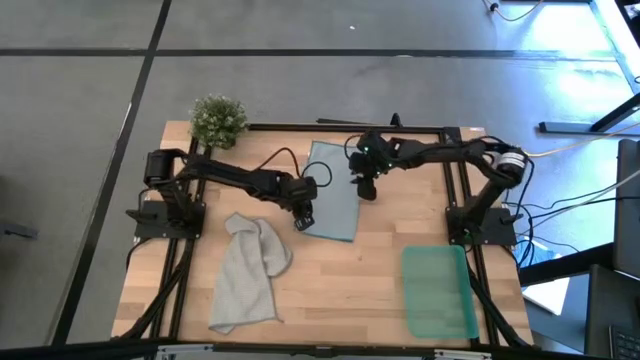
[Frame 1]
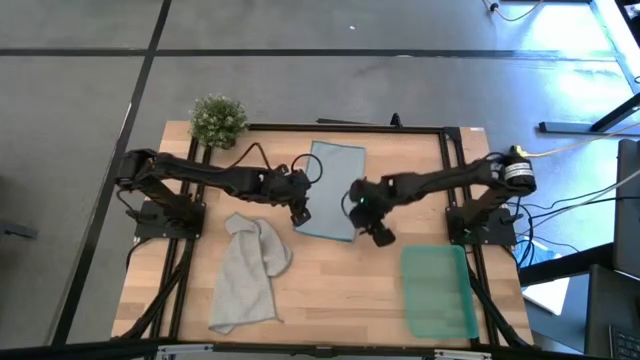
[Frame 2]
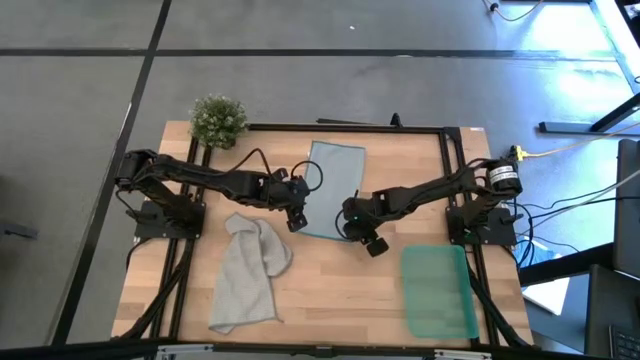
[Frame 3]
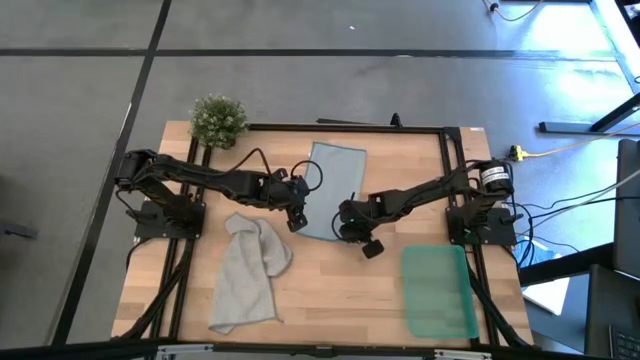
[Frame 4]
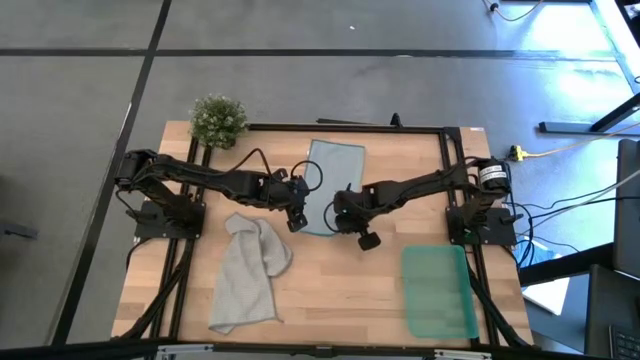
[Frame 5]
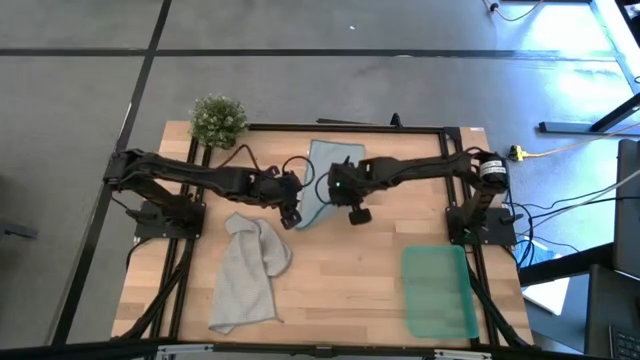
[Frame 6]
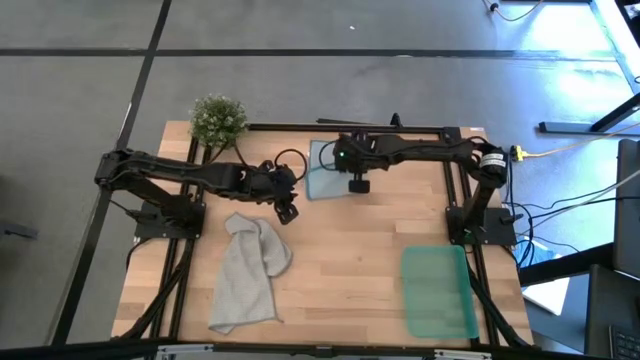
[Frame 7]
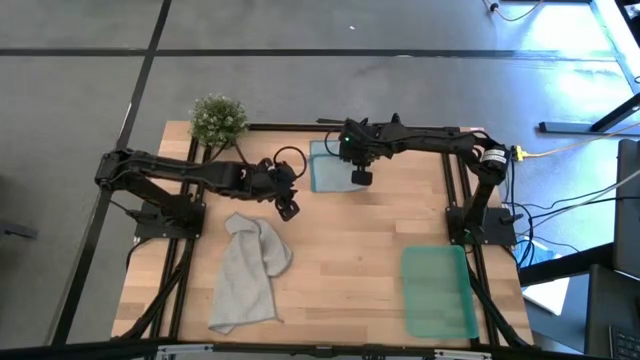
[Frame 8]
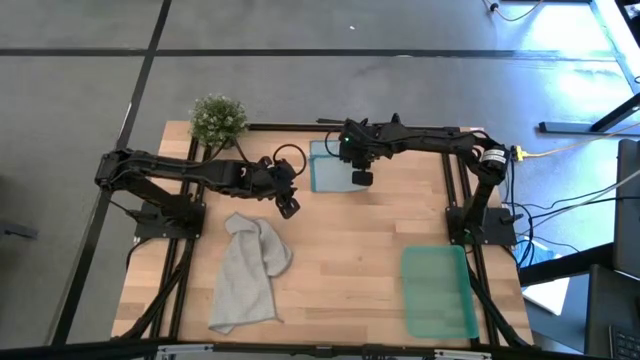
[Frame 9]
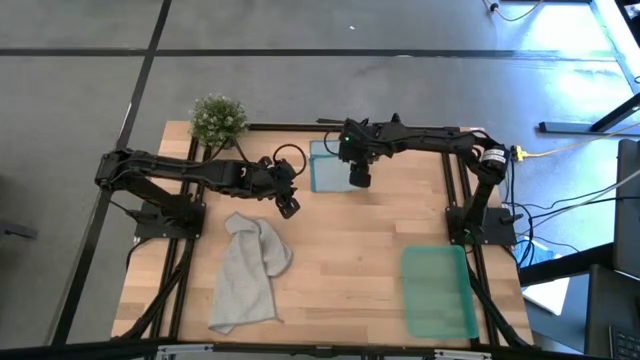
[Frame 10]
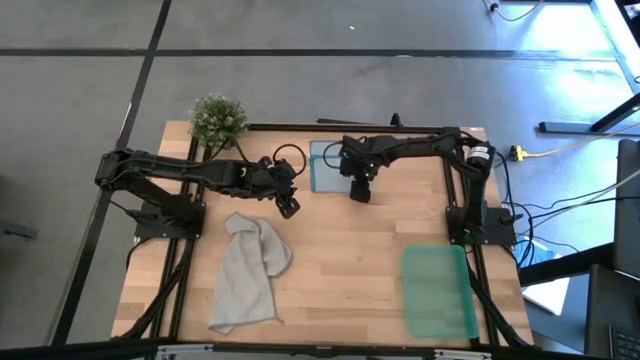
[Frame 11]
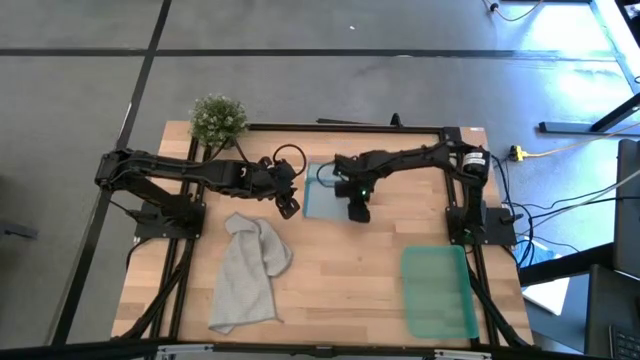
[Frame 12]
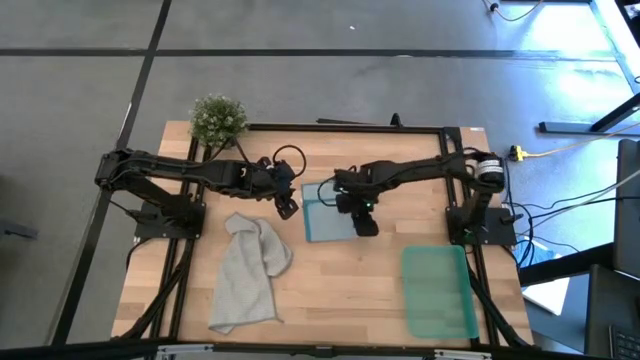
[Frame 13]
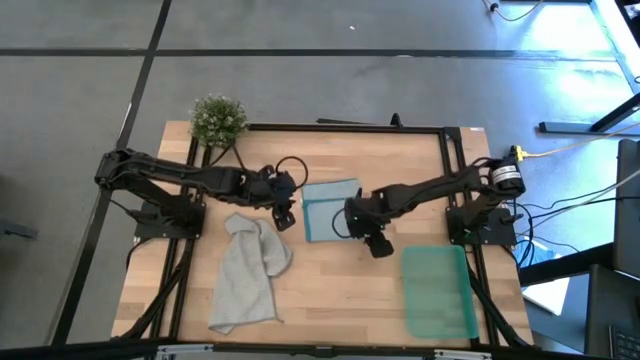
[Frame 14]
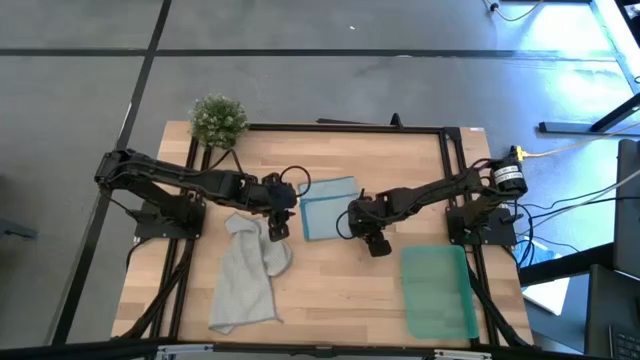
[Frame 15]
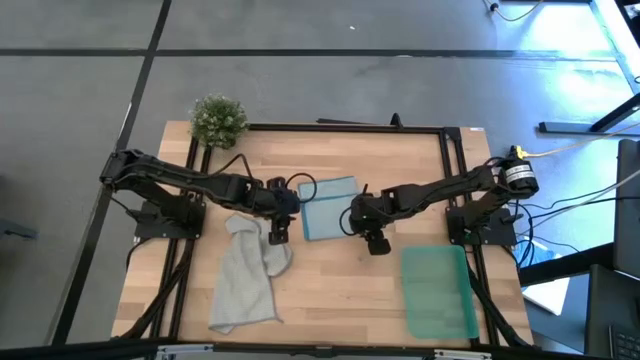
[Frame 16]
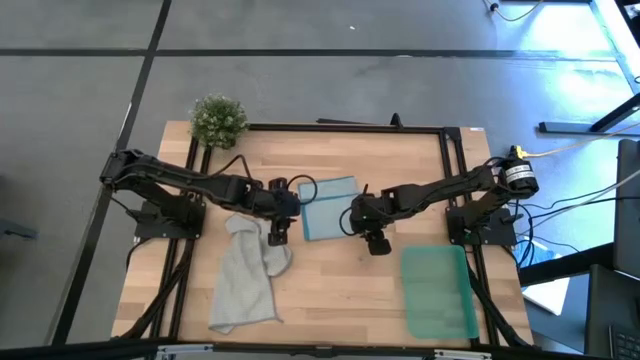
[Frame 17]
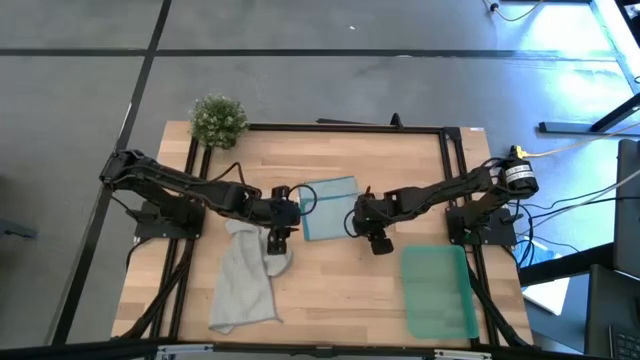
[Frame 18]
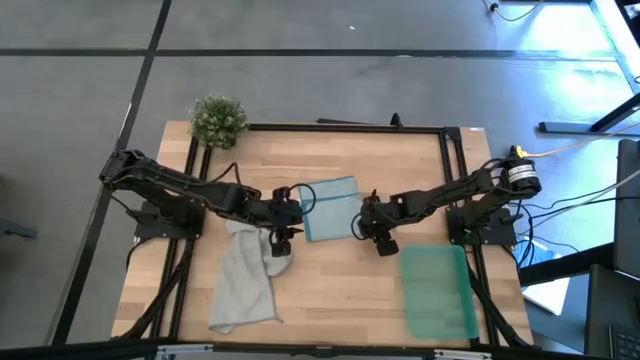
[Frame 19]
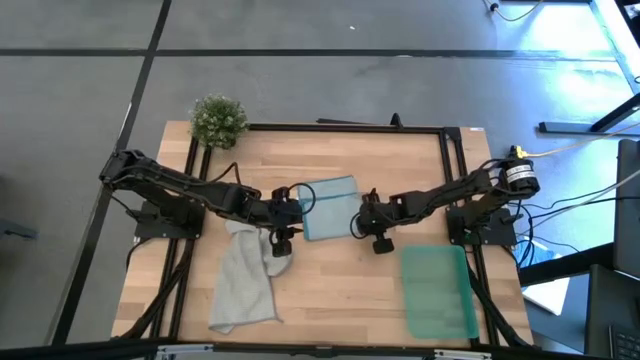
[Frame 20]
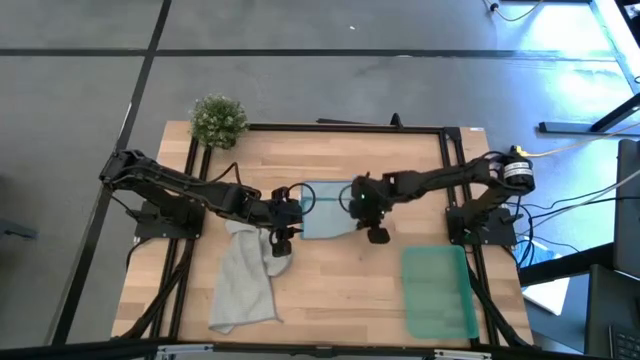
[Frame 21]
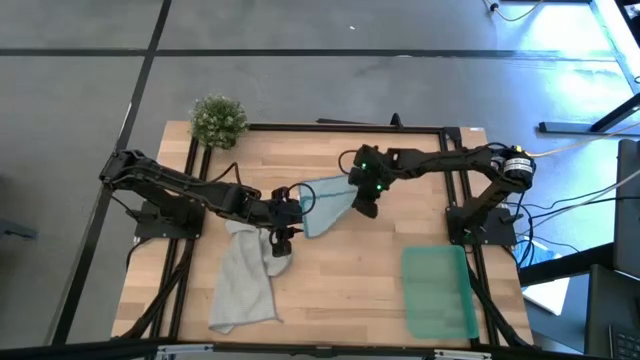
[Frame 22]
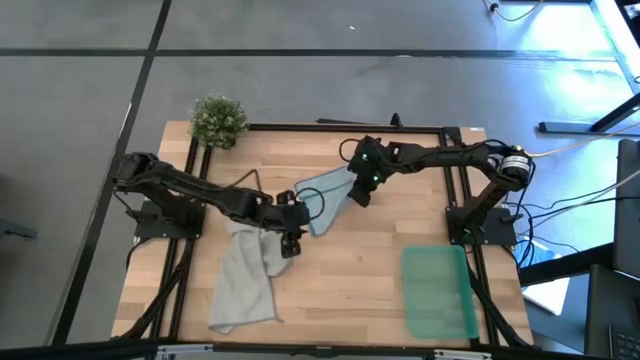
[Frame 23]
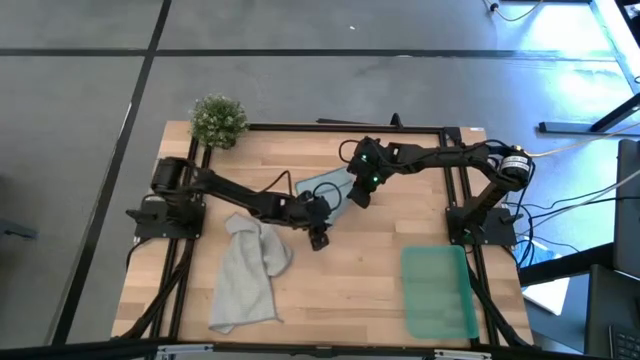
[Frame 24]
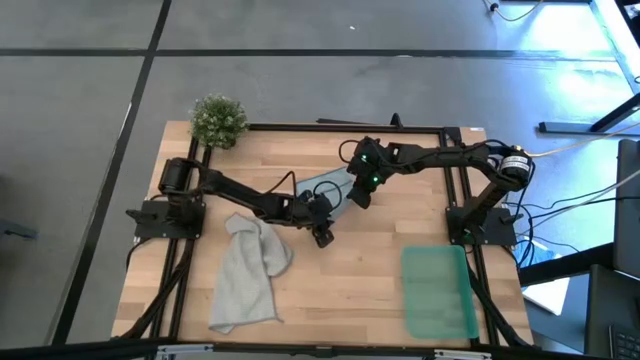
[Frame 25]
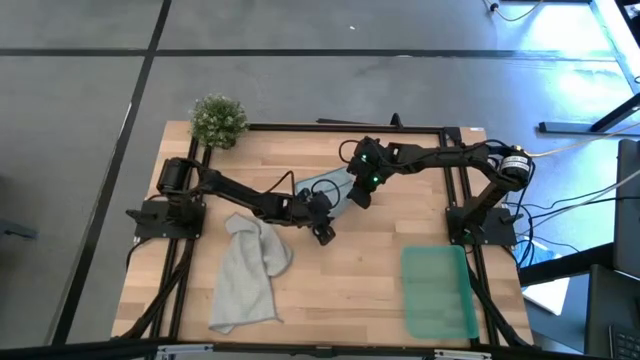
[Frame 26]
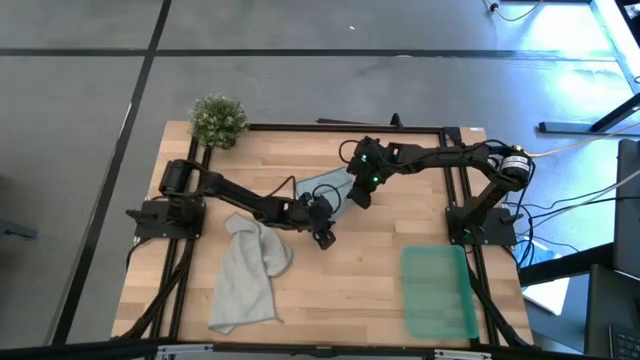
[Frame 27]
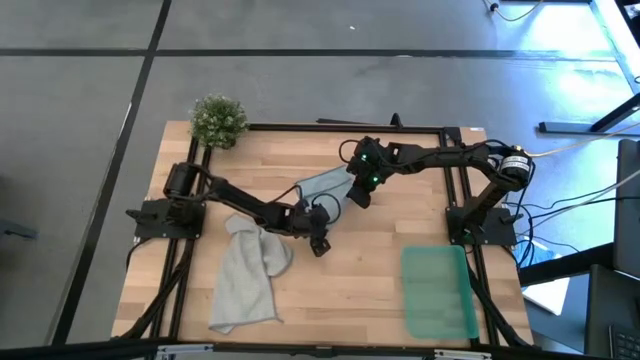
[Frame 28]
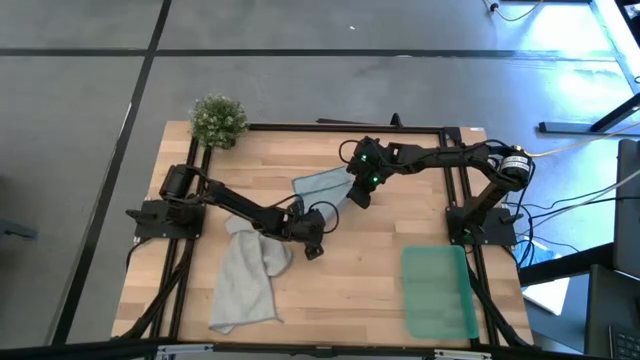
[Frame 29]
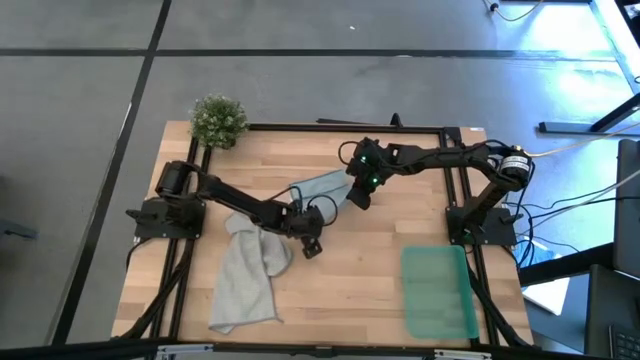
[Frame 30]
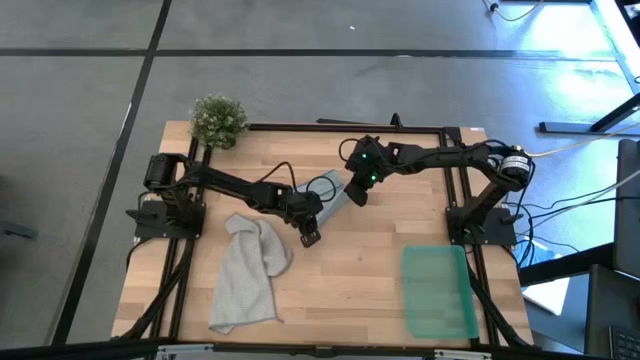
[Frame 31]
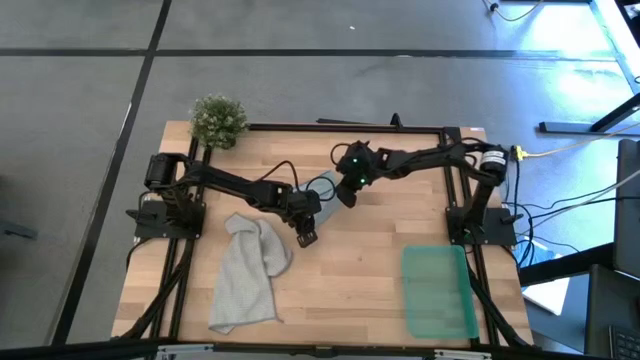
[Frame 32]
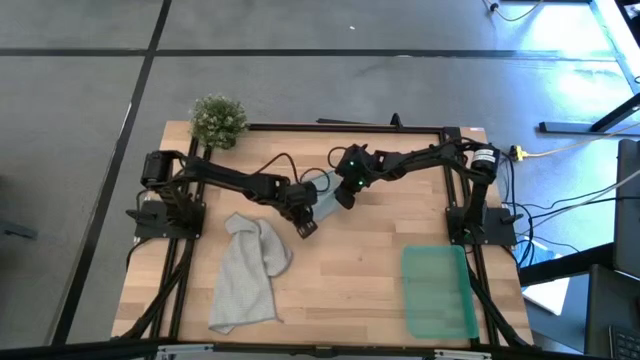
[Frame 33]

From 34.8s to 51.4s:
Task: Roll microfiber towels into tight, uniform cylinder then place into a basket
Roll the blue towel

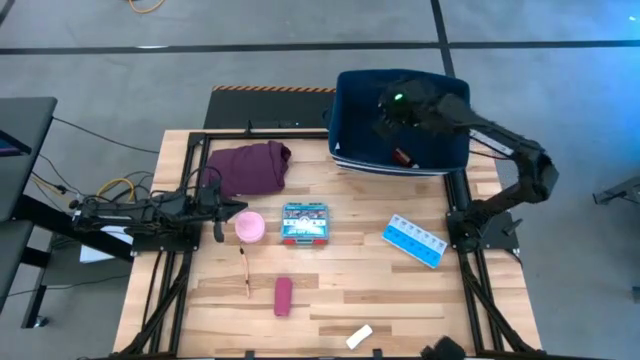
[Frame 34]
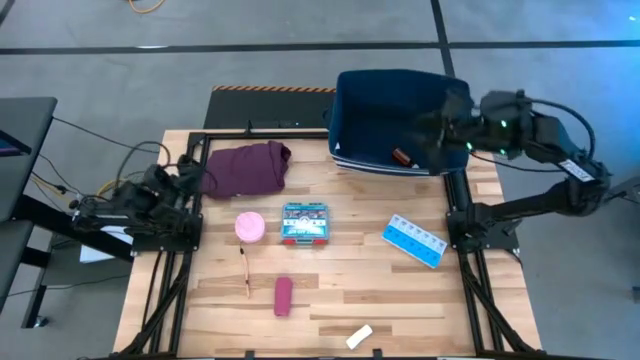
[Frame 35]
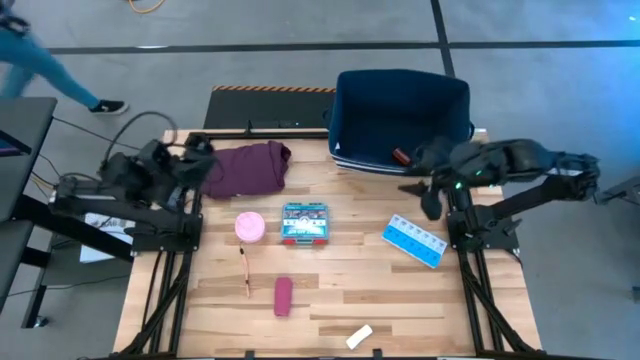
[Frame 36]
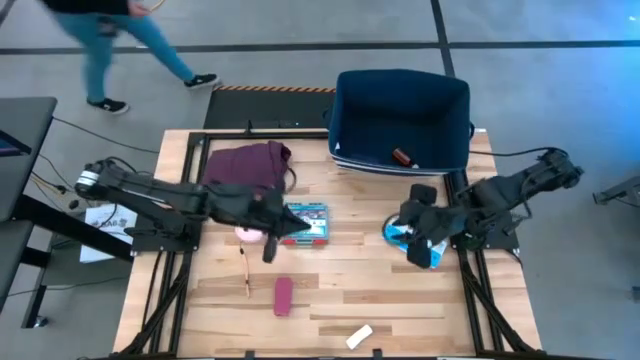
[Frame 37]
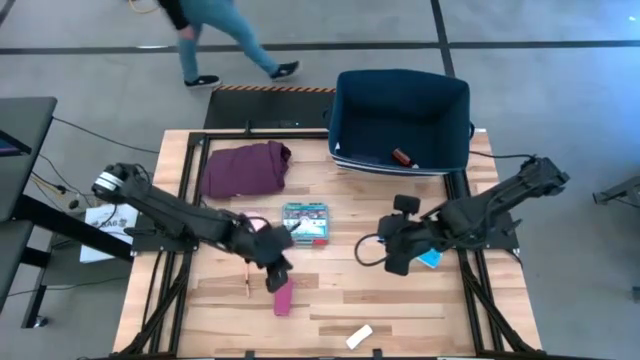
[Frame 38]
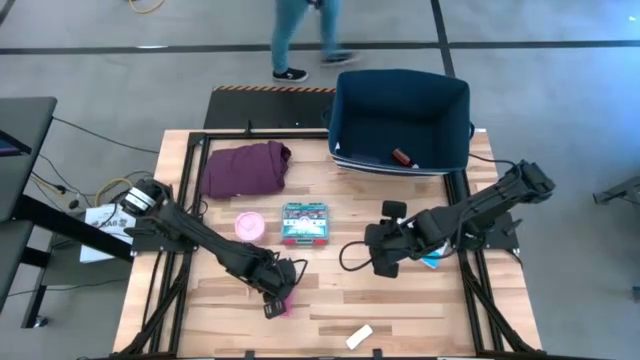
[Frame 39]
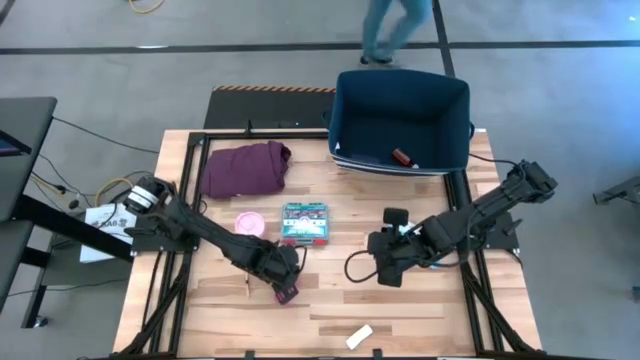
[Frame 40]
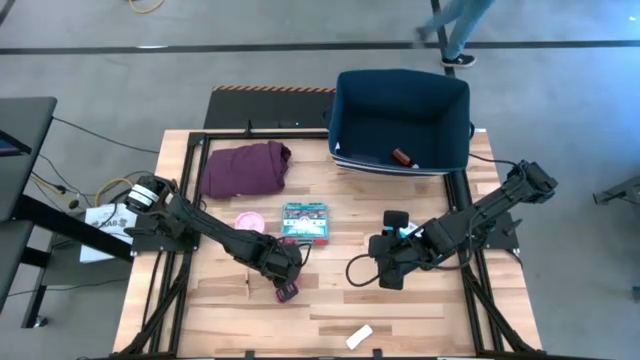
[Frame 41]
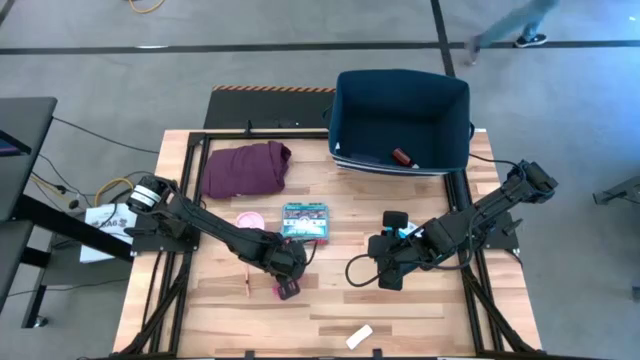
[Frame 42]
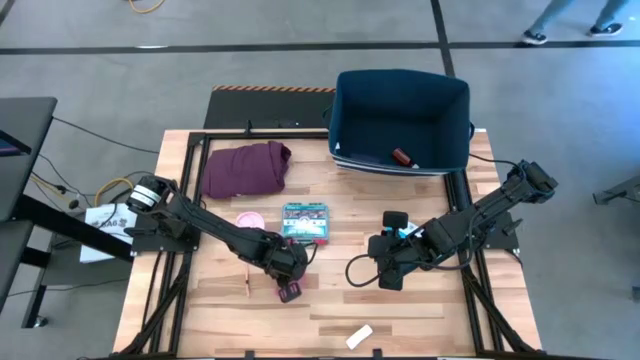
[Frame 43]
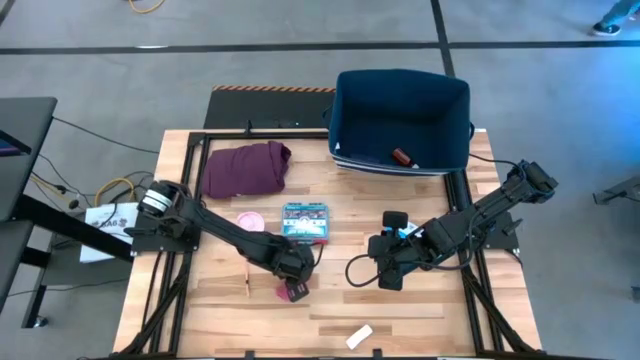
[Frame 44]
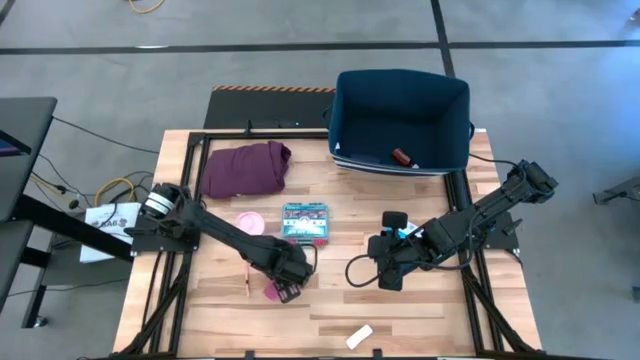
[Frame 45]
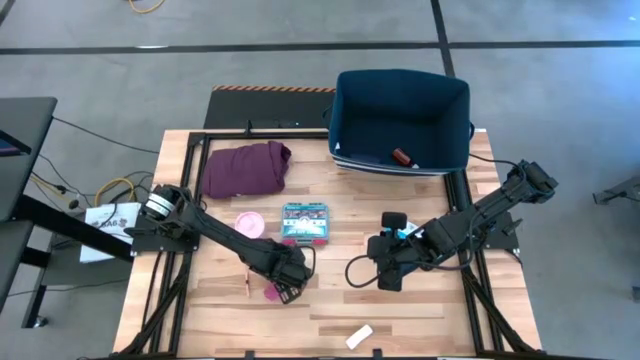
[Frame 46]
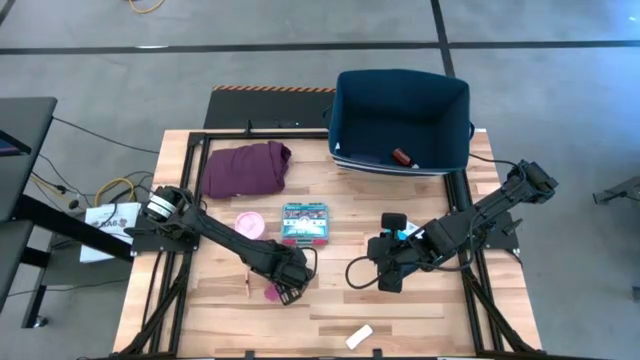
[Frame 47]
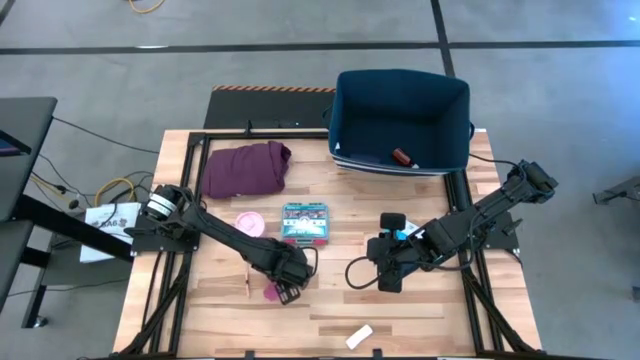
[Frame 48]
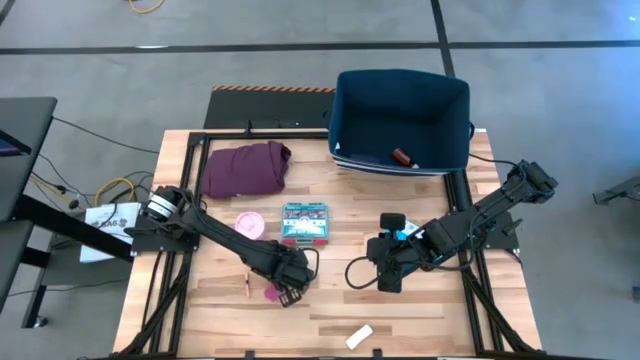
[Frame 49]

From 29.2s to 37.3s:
Task: Pick & place medical supplies in basket/bin
Put the pink bandage into the blue bin
